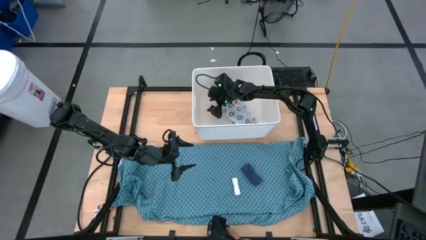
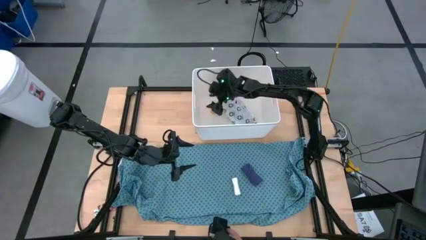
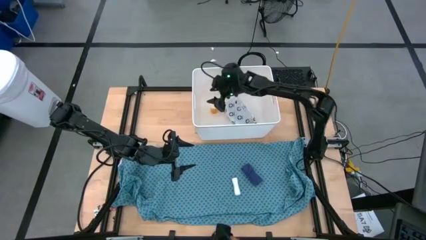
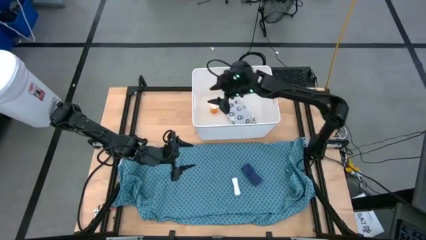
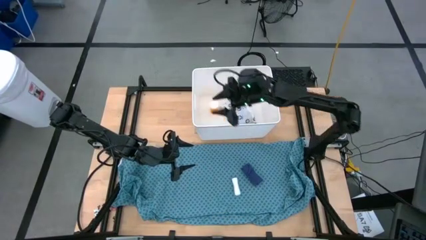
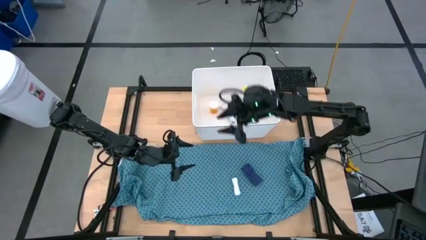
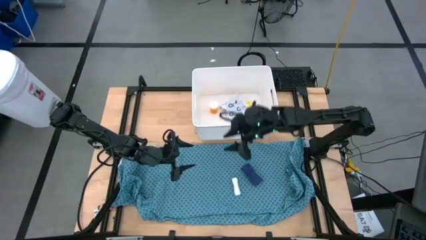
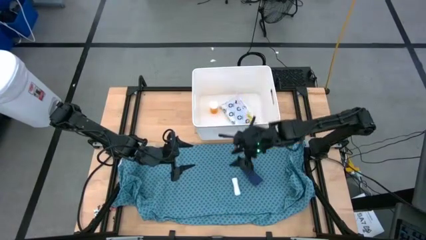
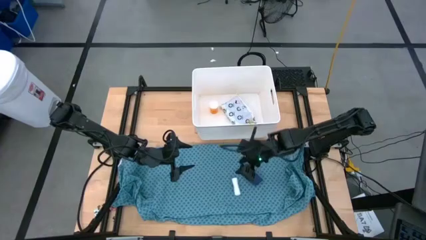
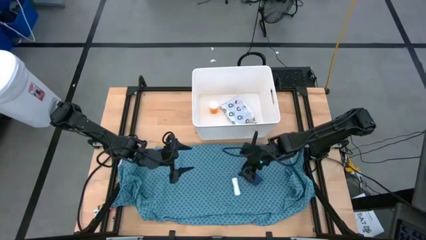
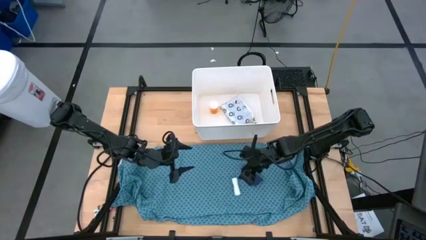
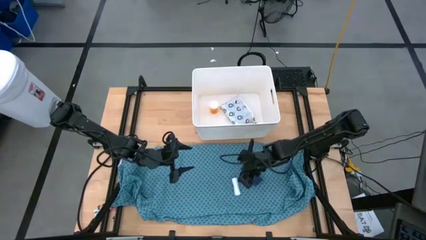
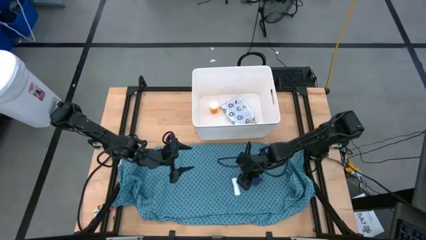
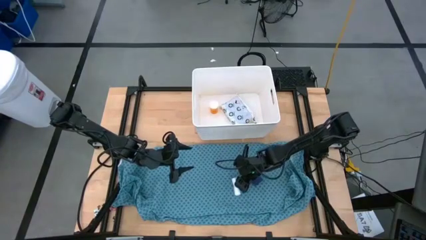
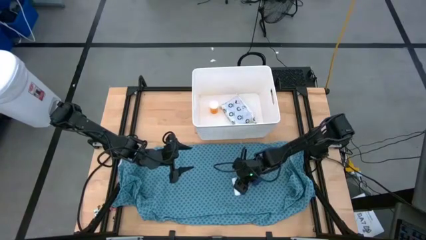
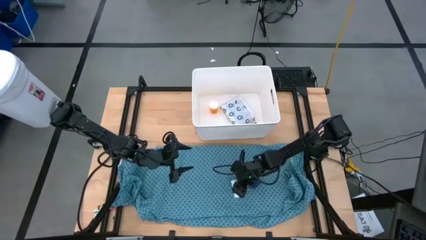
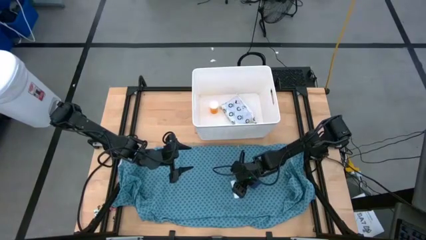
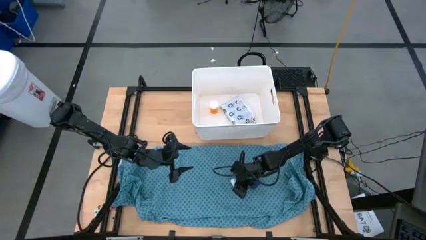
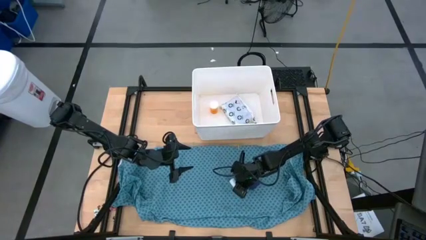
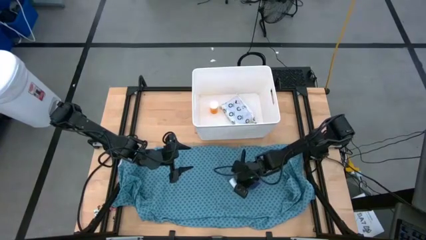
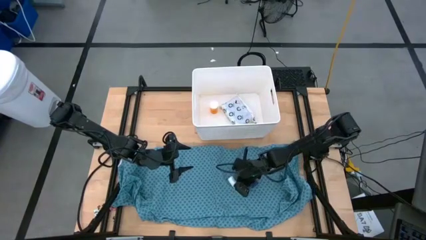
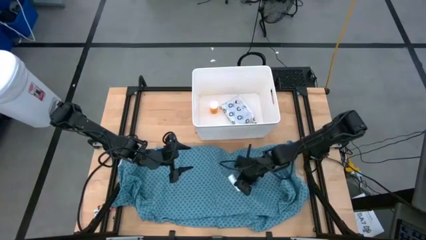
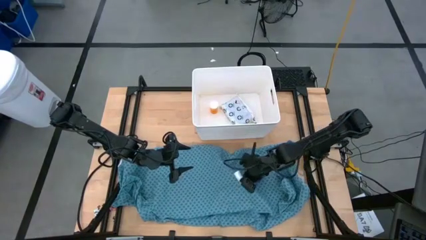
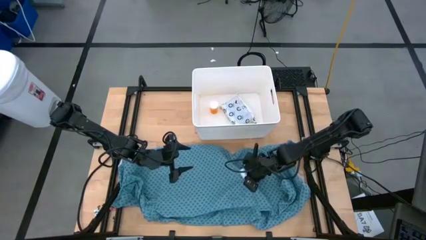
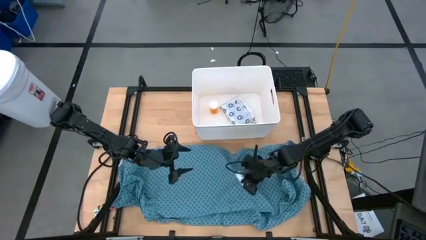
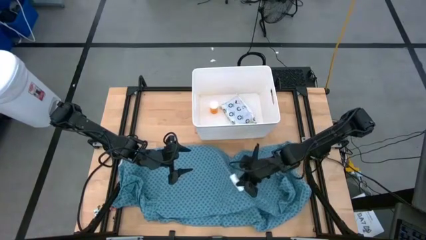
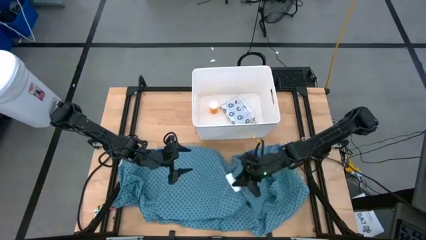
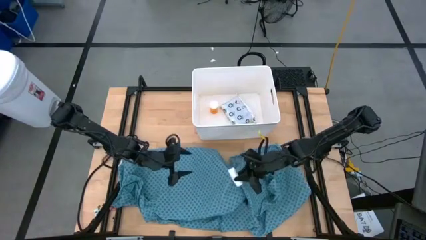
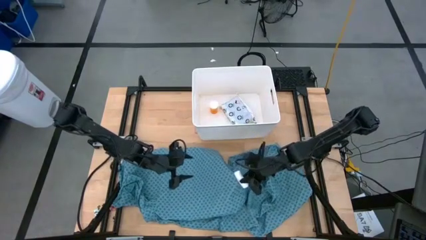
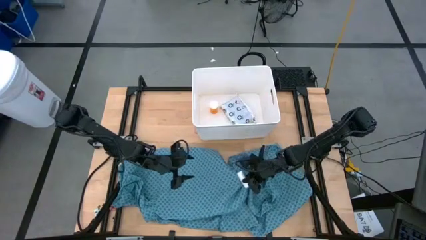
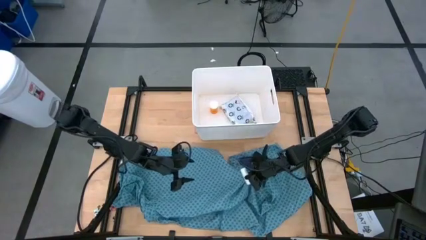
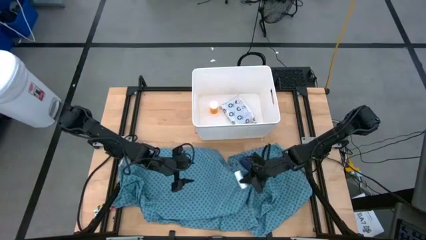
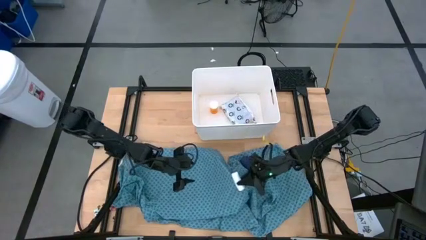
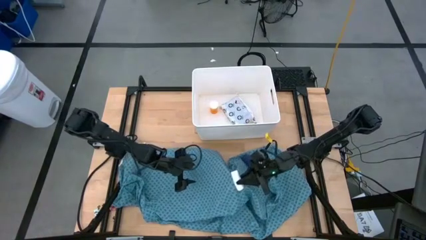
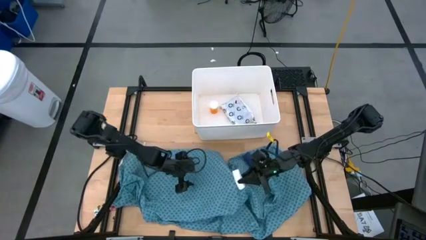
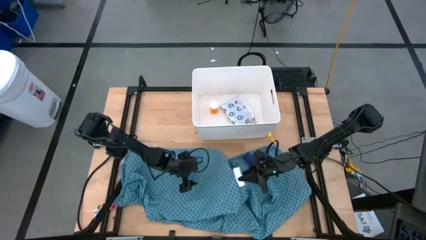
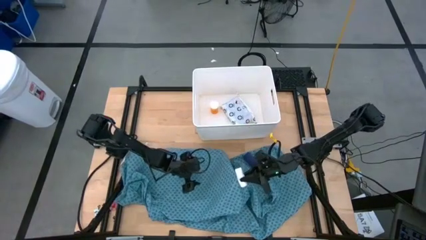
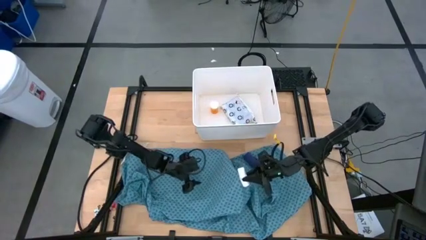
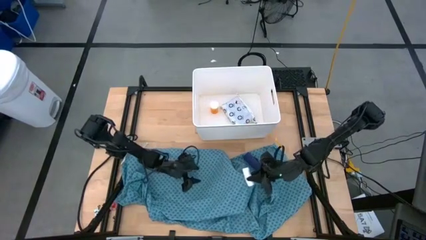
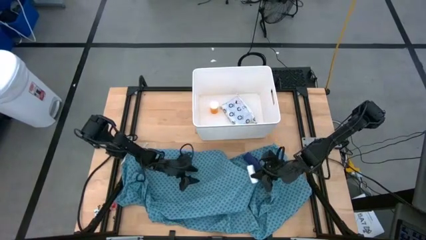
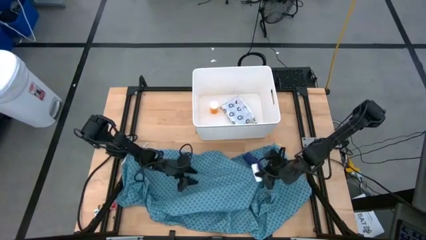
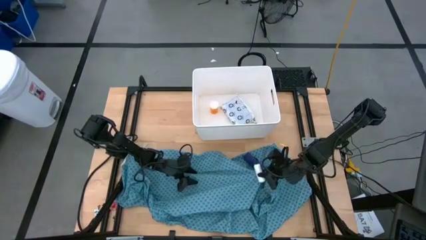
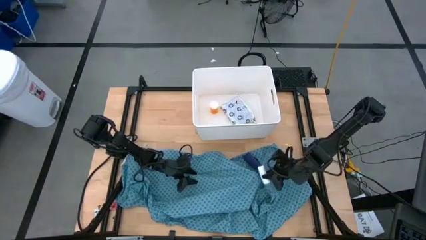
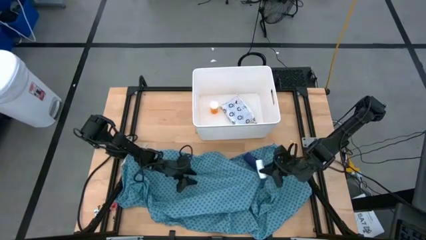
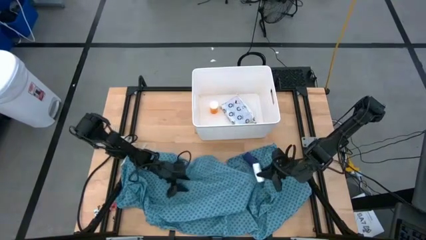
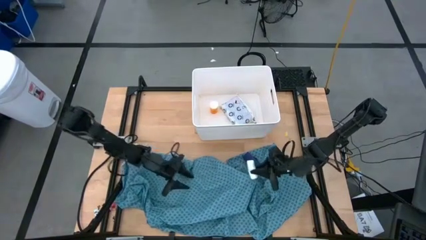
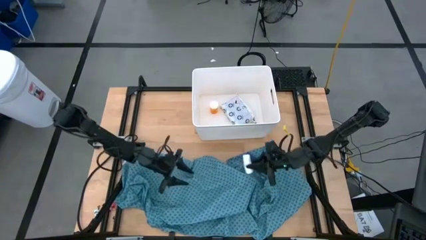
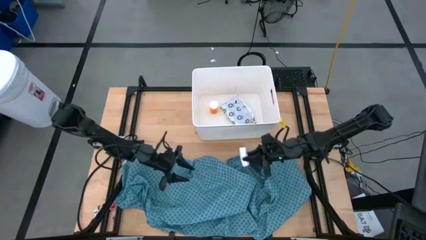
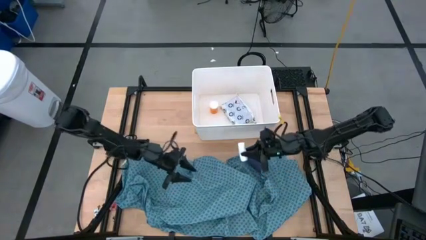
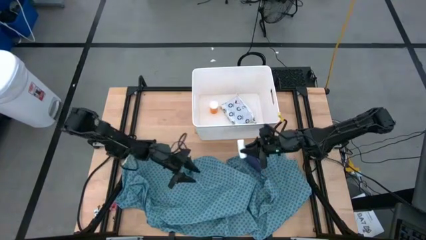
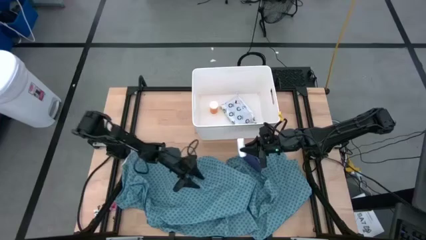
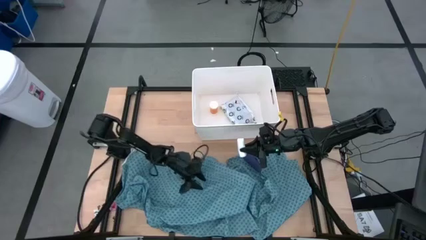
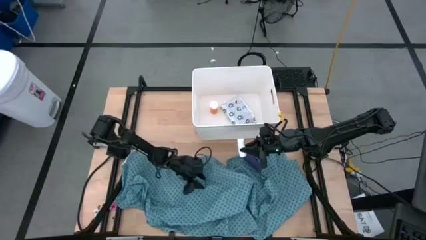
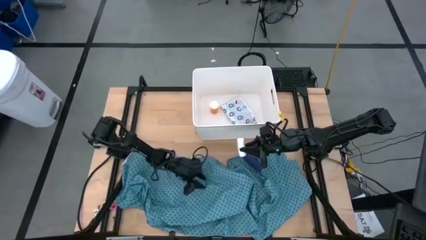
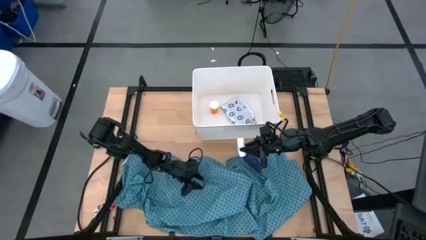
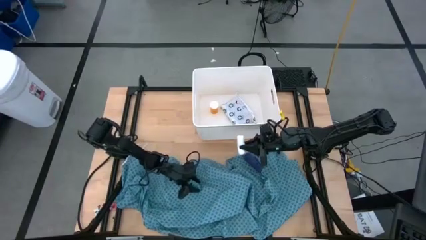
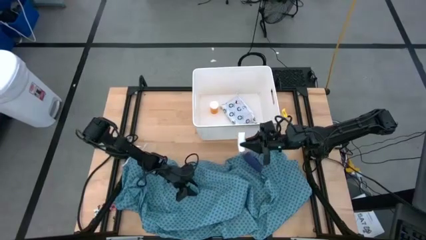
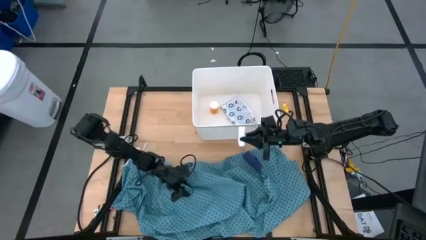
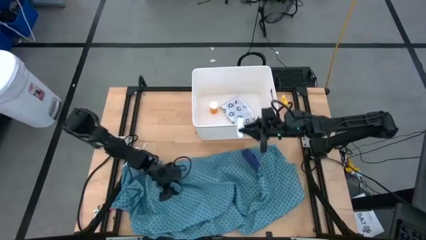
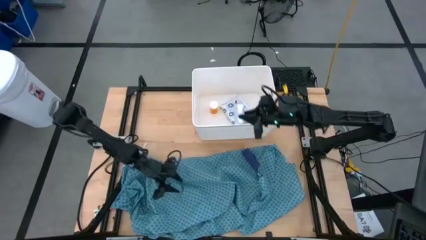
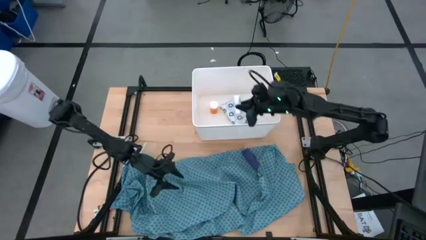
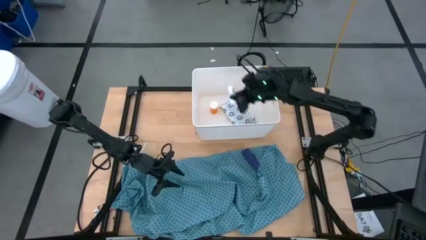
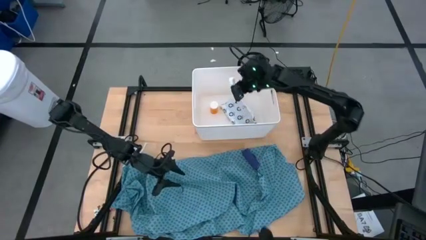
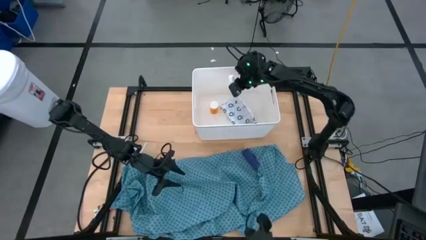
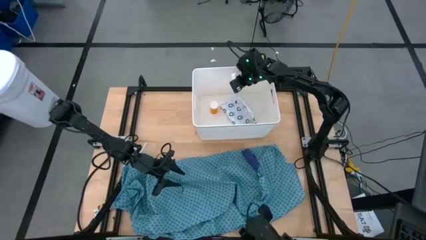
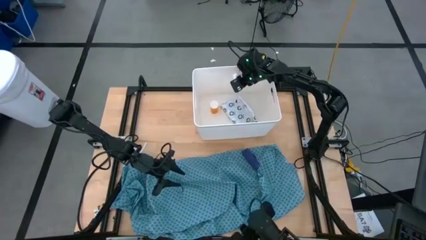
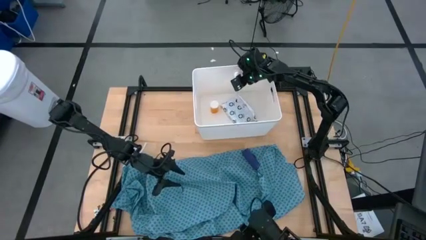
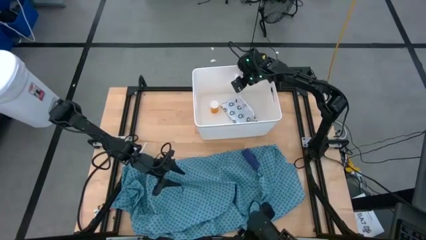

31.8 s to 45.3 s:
Task: Pick & place medical supplies in basket/bin
Put the white rolled gauze into the white bin

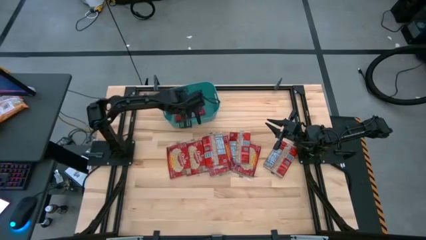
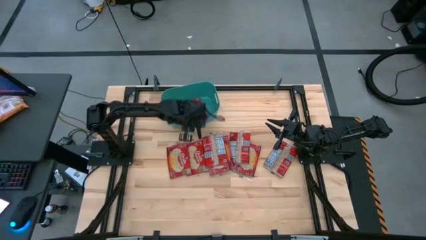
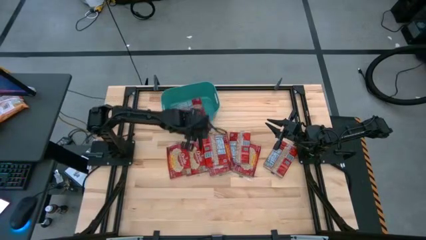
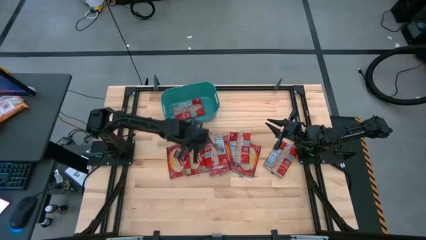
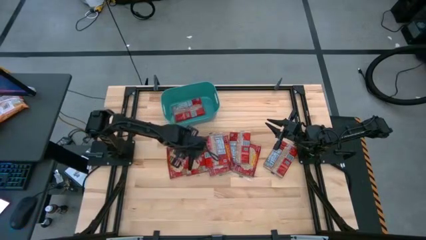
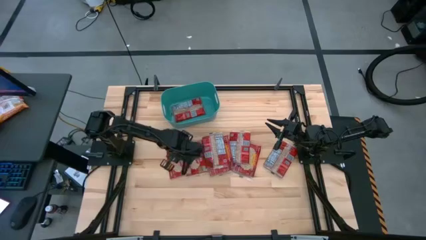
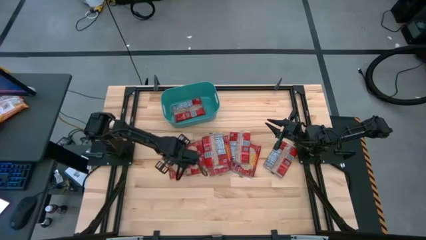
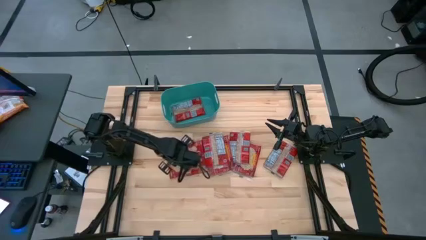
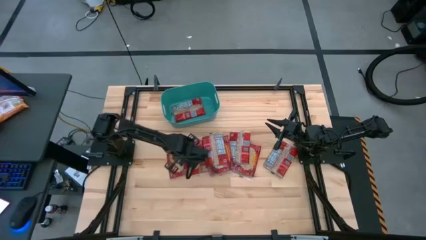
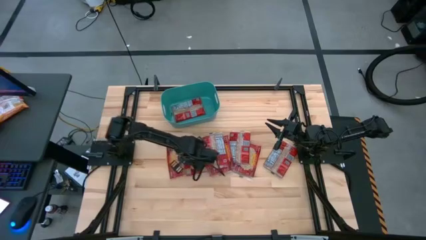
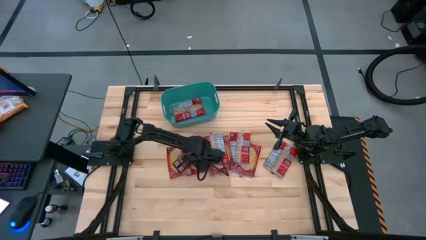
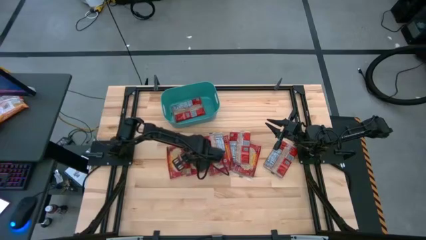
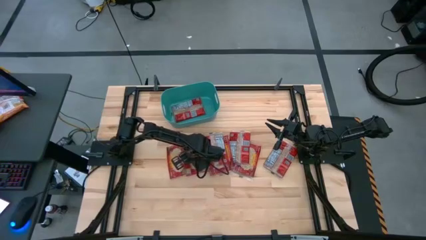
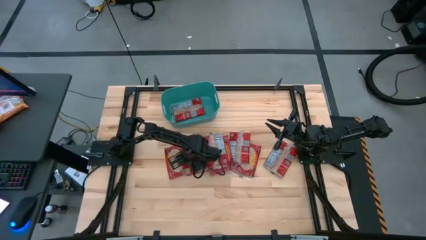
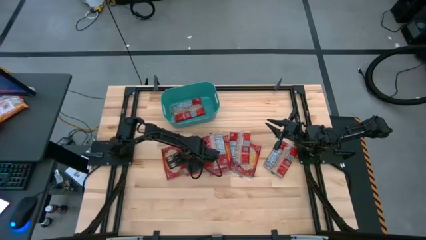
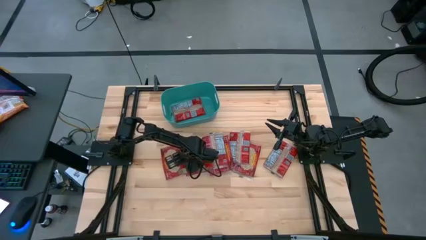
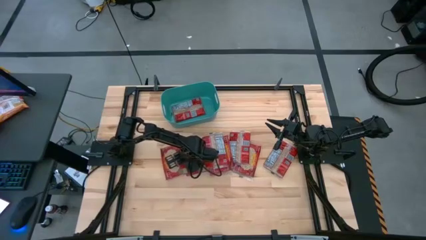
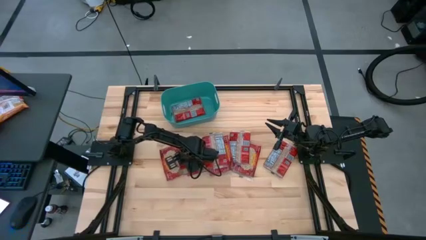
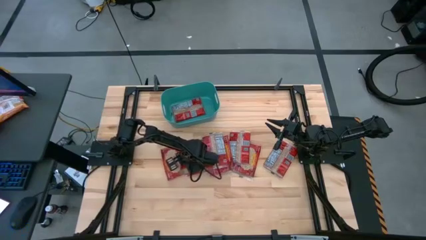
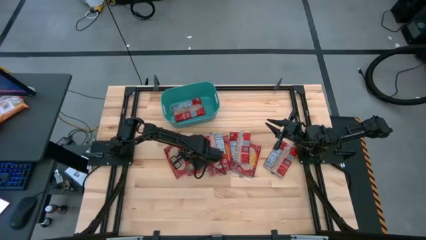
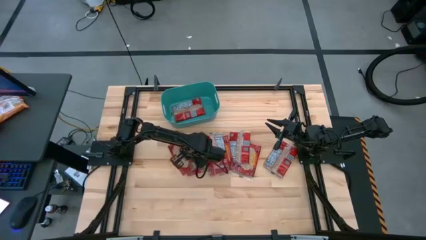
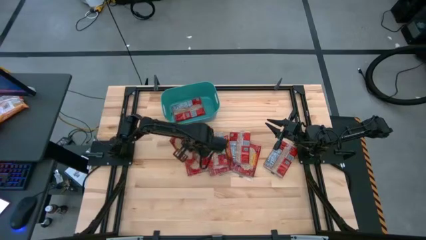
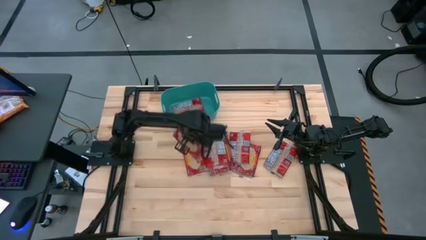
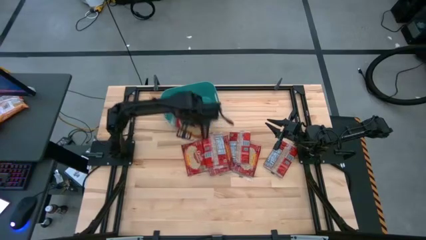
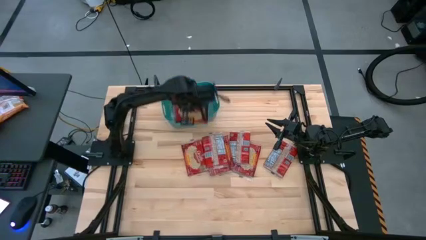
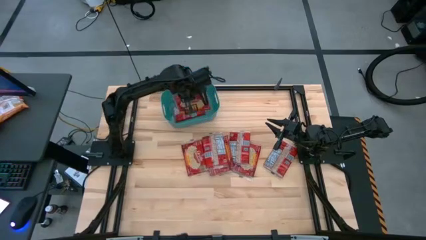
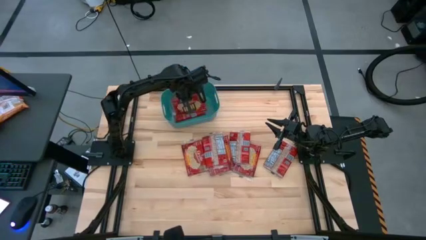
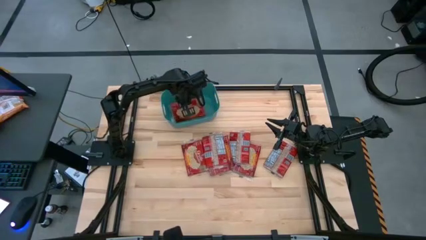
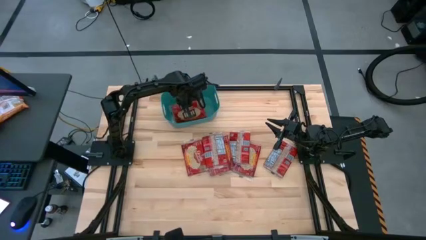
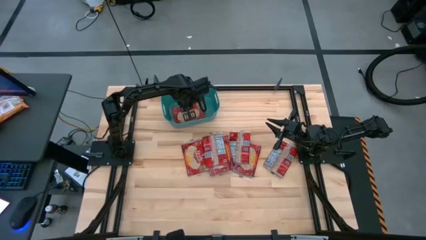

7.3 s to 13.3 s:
Task: Sort popcorn bags into baskets
Stack the popcorn bag into the green bin
